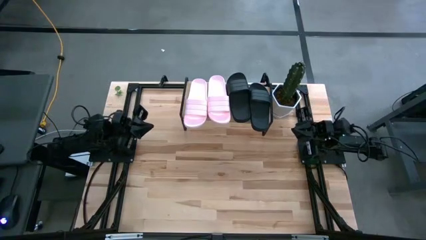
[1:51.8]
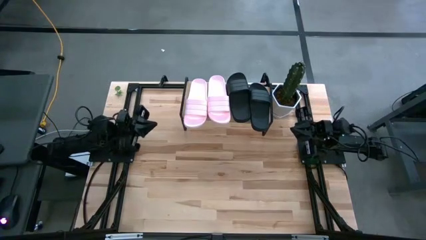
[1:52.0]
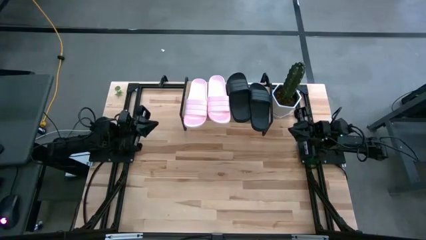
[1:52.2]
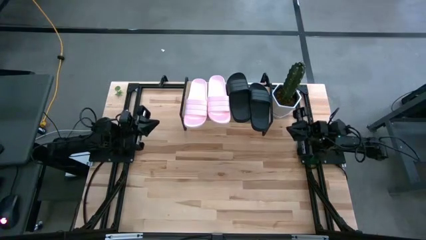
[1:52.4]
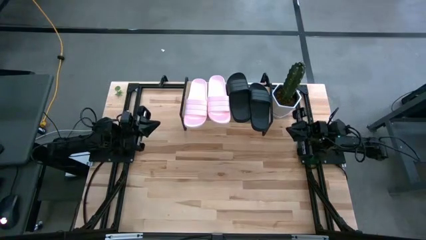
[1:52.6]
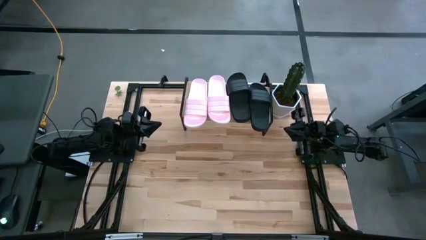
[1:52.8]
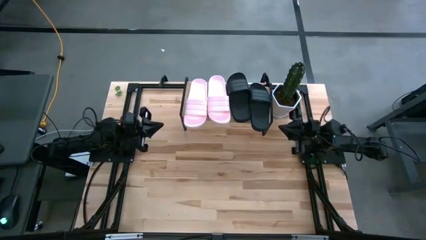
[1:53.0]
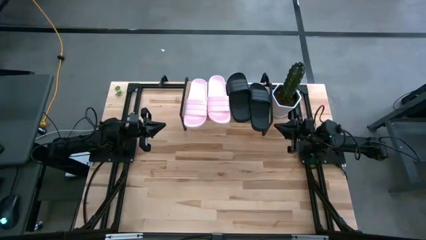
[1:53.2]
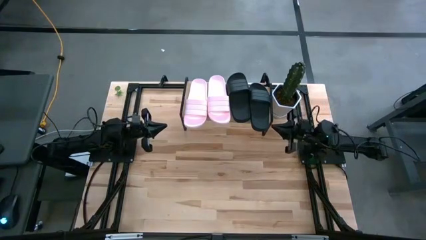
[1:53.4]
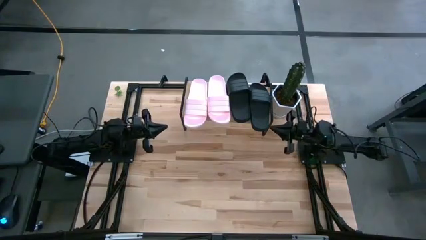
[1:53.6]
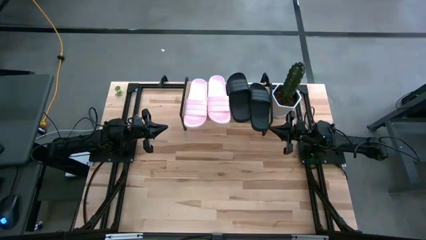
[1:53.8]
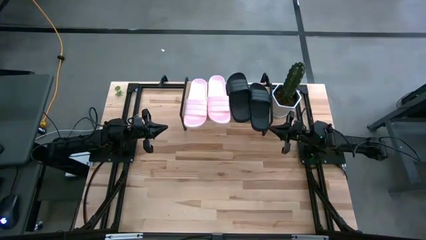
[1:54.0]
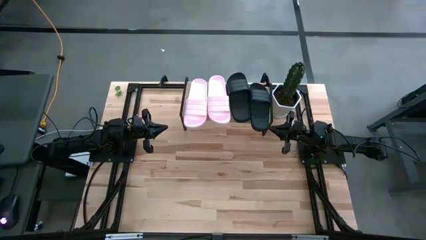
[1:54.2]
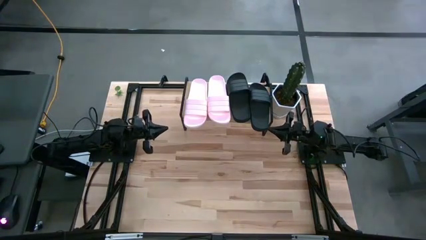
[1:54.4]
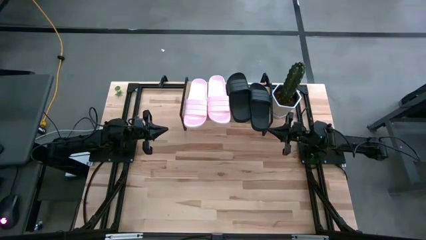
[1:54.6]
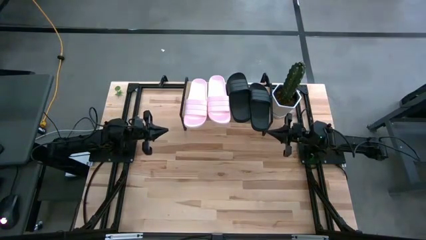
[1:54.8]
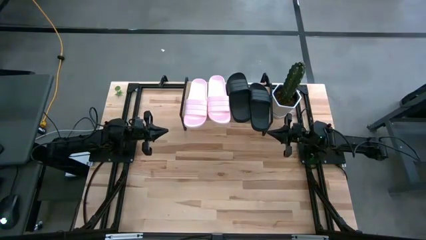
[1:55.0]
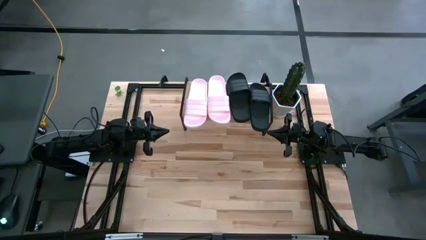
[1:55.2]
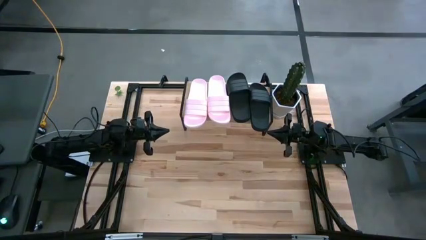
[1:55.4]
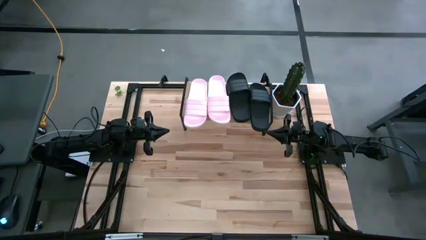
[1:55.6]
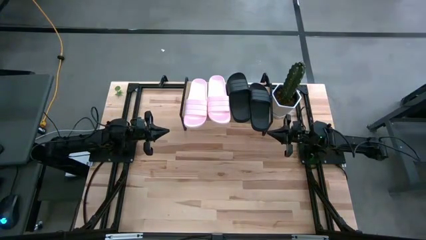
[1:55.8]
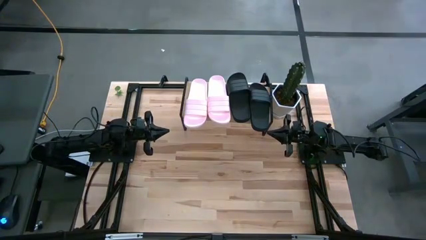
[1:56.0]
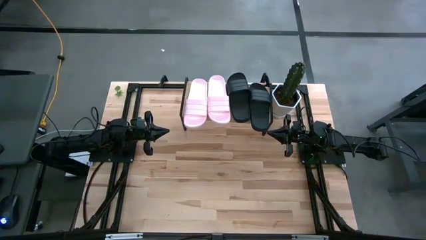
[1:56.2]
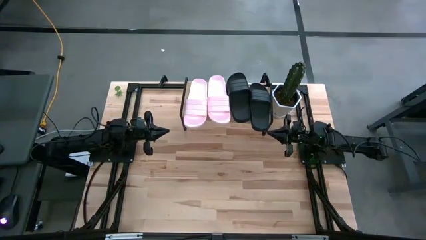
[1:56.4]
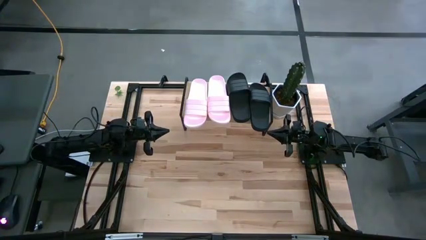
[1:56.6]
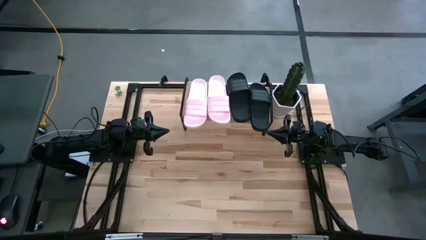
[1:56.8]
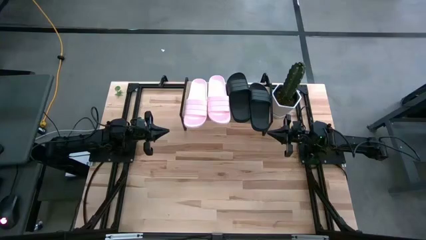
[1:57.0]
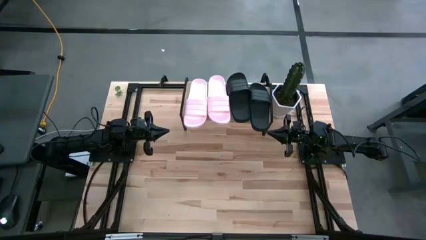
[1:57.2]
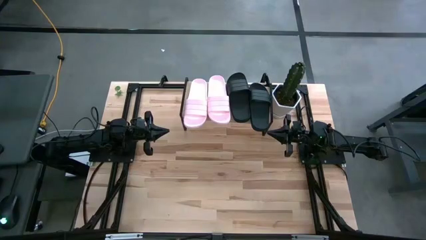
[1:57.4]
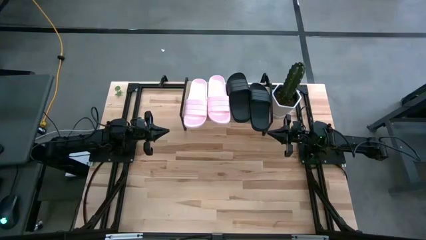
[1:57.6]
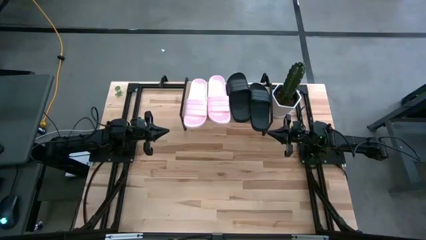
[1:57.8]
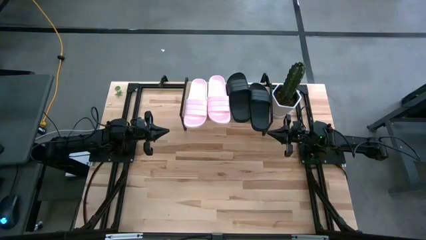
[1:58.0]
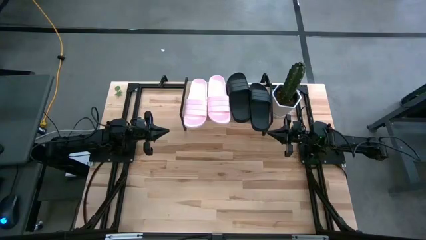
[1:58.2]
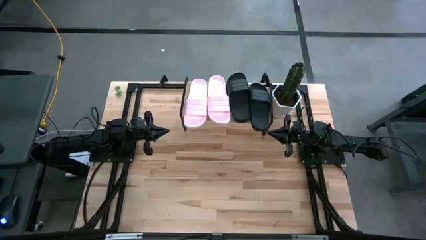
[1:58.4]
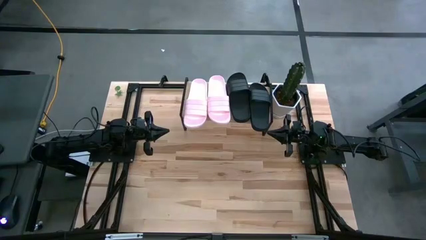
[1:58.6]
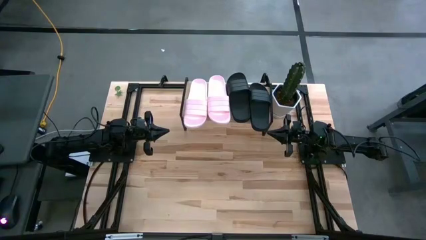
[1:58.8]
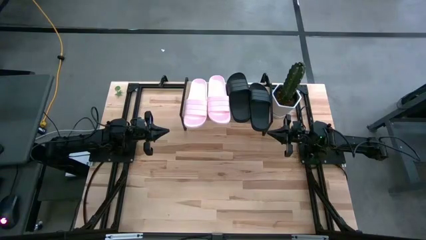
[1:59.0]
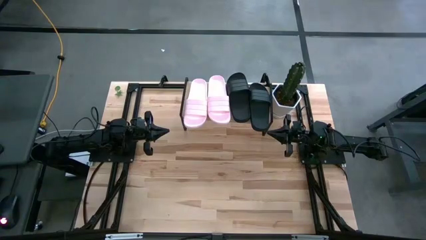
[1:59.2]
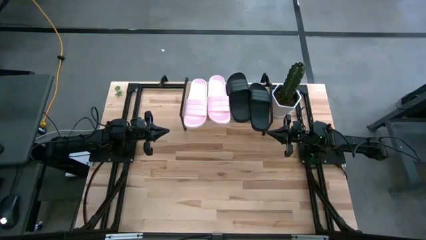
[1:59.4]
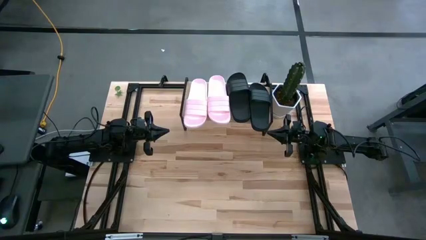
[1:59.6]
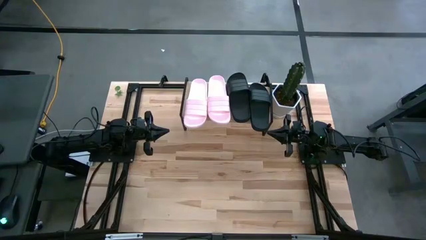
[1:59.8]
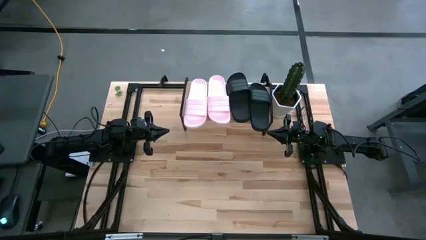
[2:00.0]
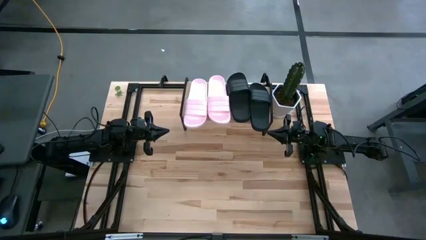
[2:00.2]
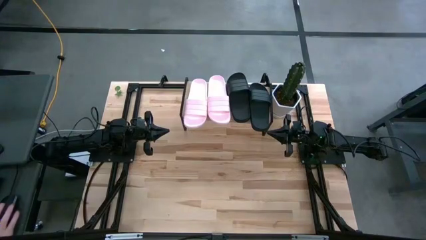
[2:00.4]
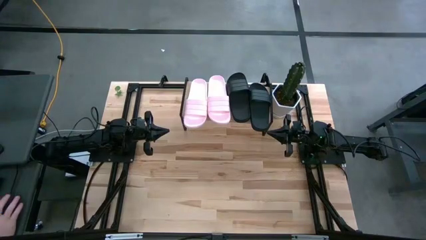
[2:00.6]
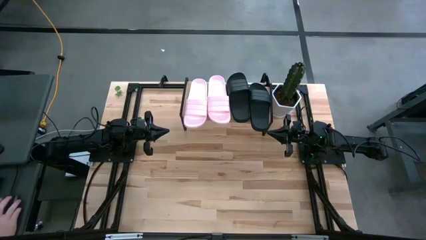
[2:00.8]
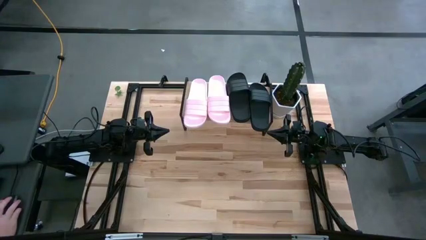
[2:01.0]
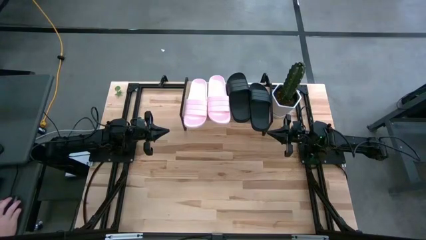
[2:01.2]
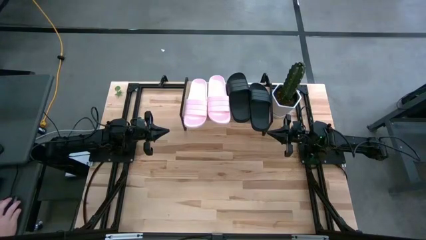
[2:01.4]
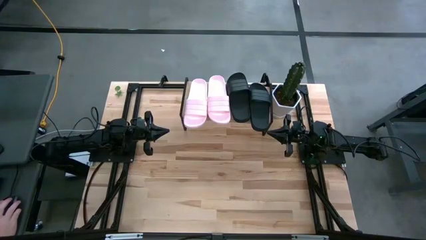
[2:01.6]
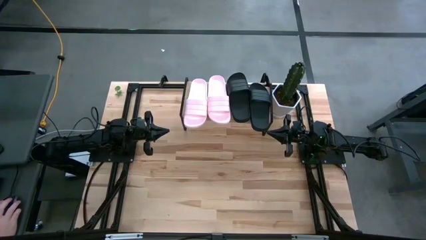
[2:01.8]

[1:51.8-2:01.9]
Task: Pick and place slides into the shelf
Return to Home Position

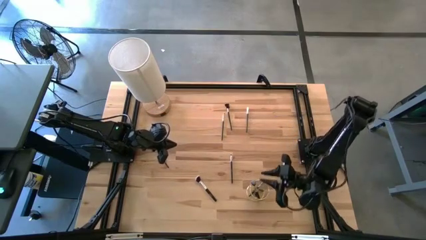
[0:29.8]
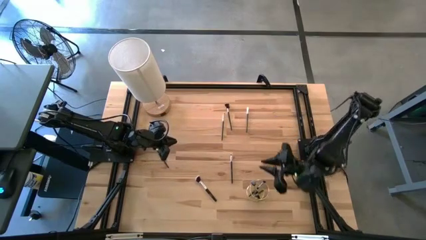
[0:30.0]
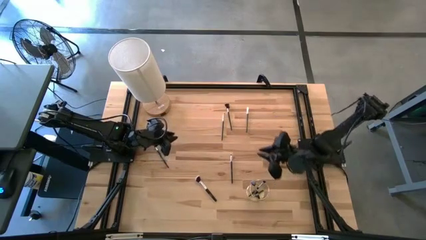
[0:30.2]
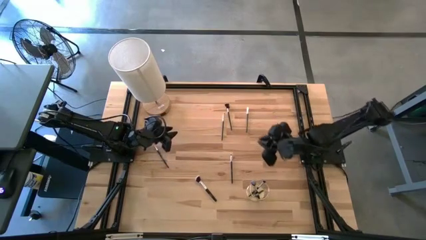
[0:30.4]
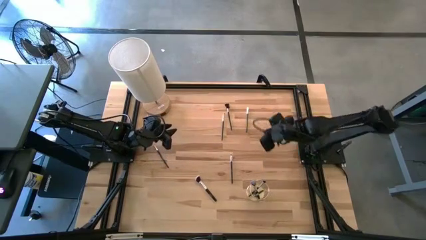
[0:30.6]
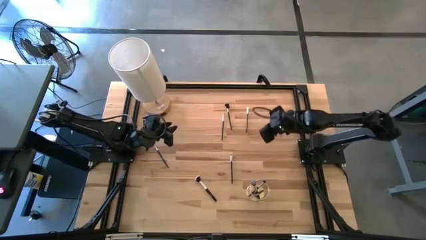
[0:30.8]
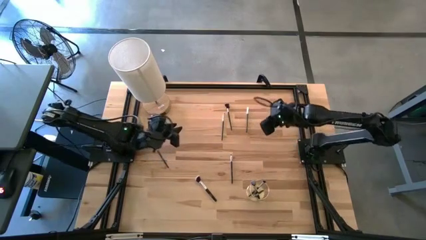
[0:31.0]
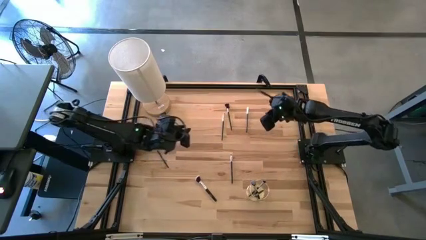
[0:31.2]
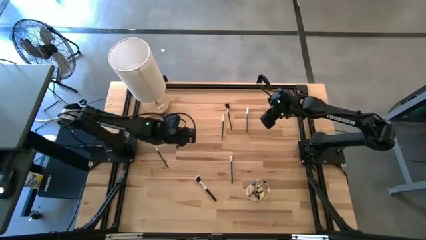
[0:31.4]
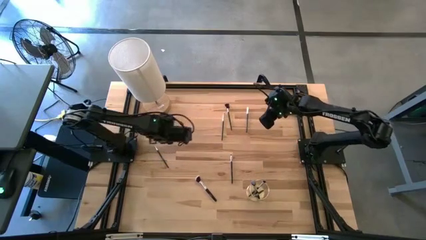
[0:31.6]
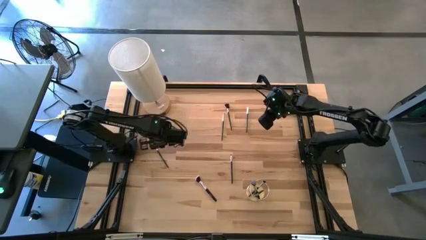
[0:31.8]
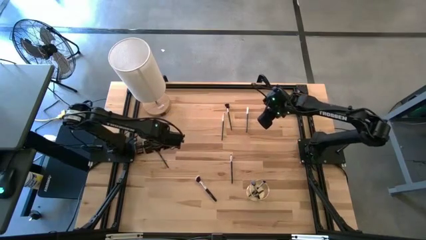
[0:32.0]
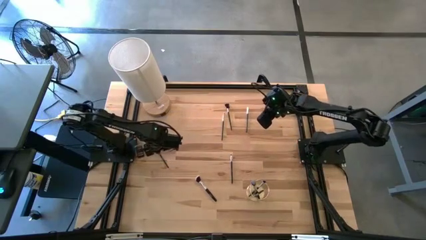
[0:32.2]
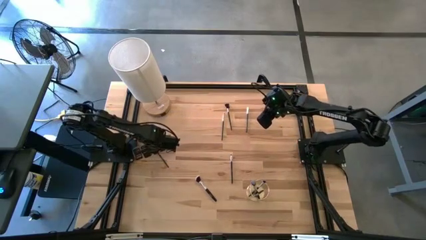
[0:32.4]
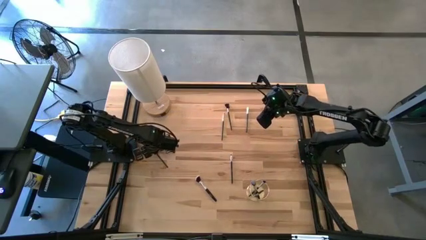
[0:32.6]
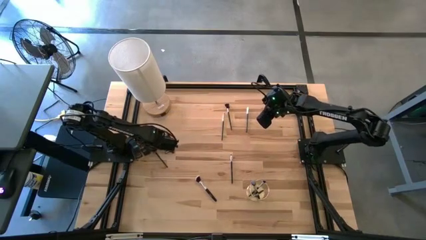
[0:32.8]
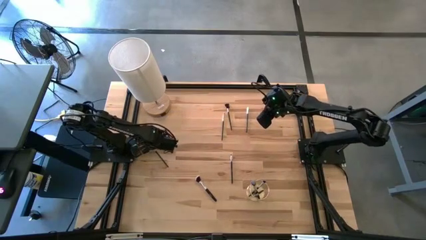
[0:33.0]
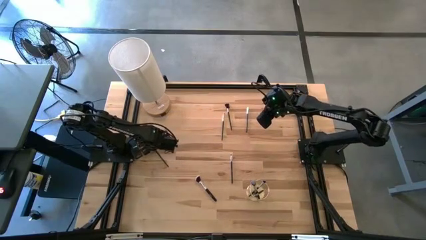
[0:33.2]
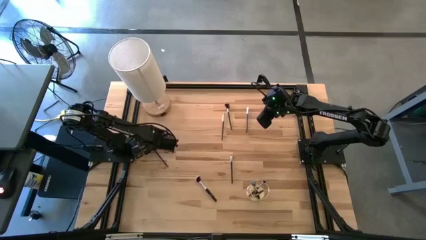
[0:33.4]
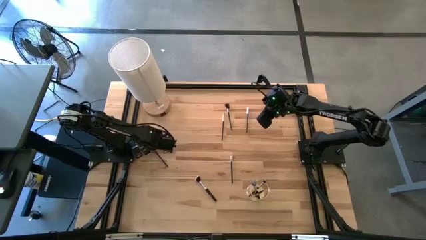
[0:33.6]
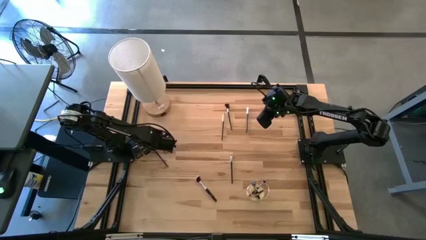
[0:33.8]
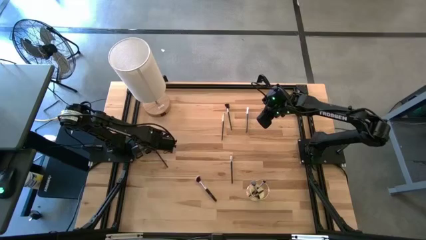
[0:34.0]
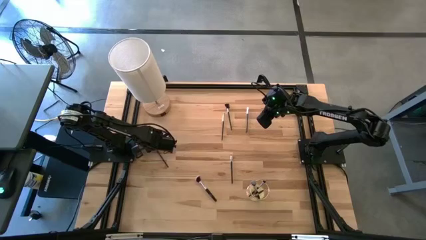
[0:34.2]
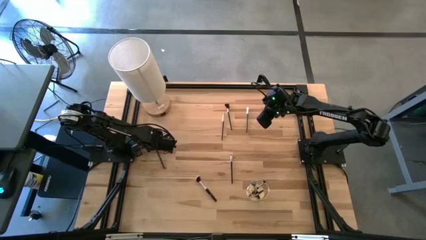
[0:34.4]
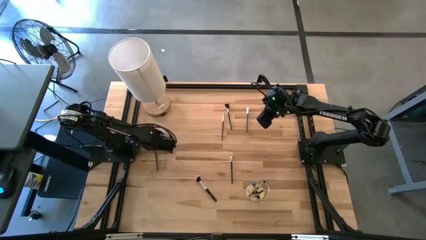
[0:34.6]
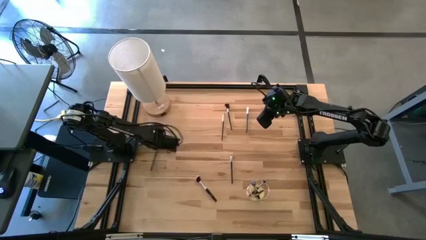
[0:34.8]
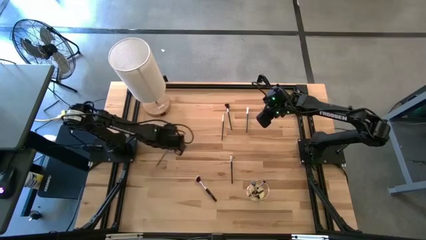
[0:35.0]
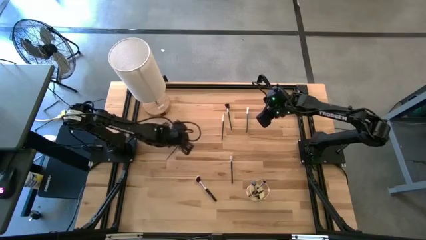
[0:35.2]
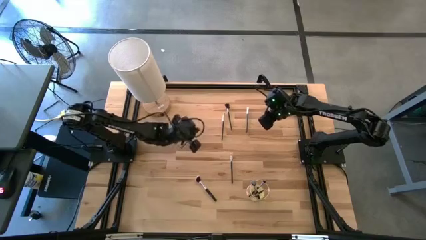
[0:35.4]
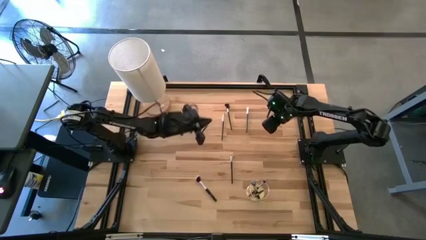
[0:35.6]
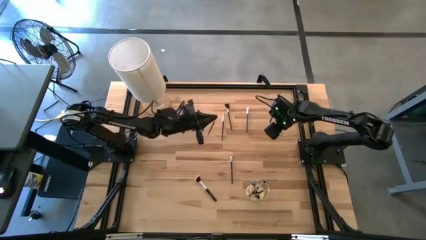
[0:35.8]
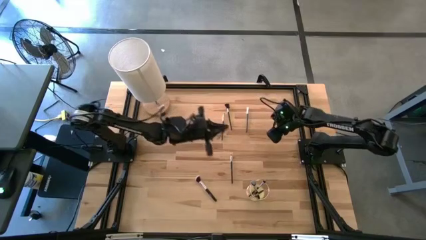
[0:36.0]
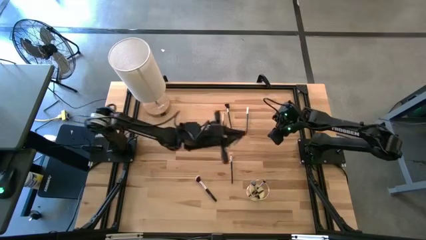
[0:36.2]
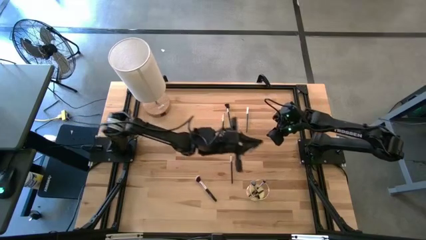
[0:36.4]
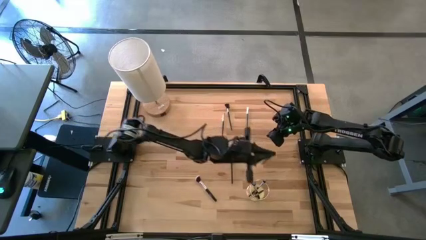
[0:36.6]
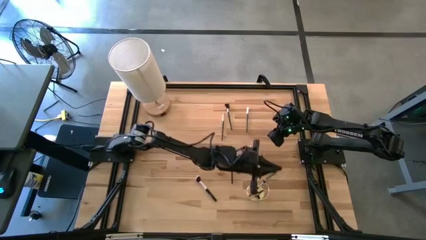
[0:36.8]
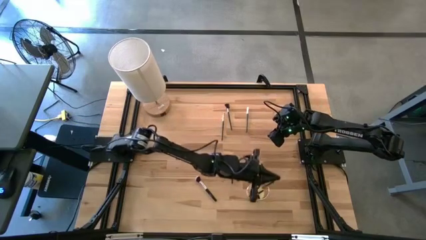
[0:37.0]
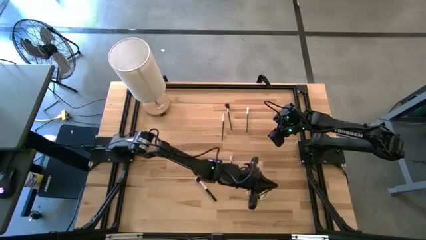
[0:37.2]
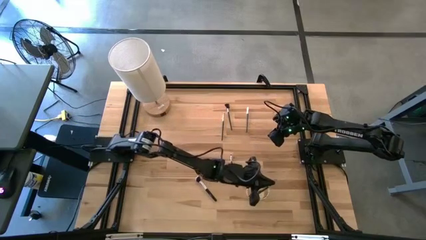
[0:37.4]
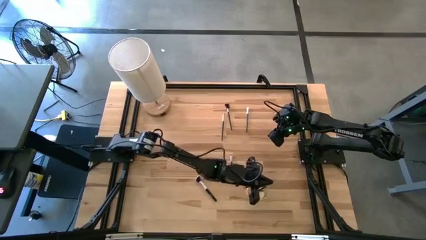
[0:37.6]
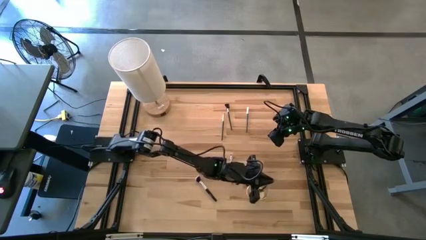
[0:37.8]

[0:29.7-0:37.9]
Task: Pick & Place Makeup Brushes
Put the eyeshadow brush into the makeup holder
